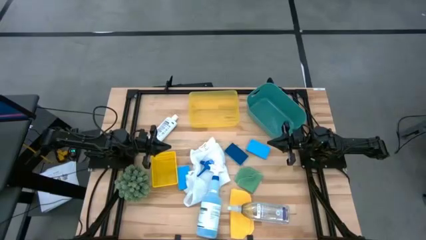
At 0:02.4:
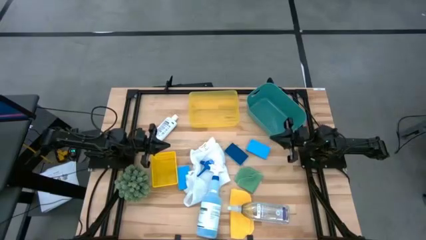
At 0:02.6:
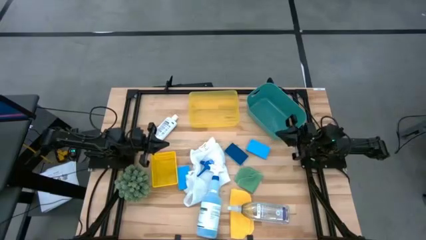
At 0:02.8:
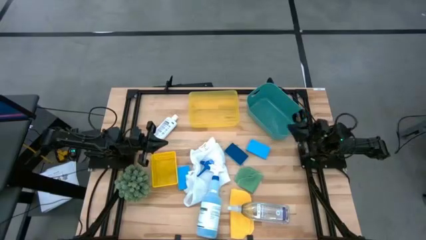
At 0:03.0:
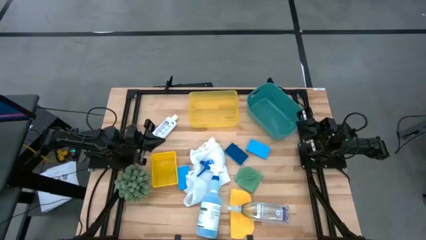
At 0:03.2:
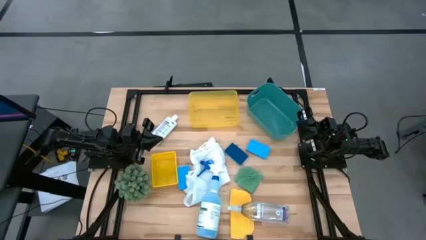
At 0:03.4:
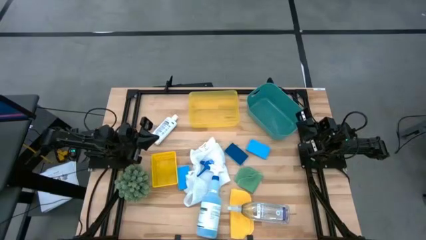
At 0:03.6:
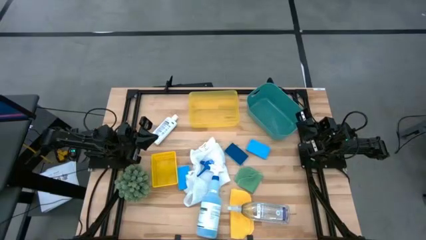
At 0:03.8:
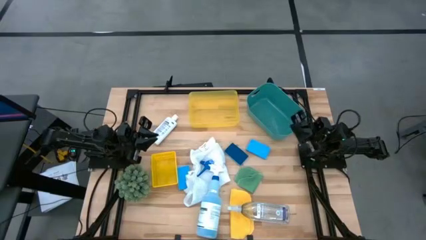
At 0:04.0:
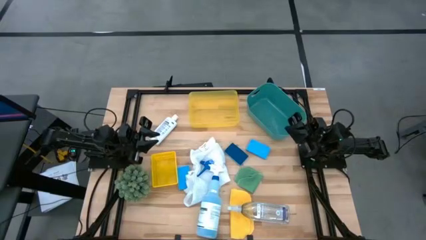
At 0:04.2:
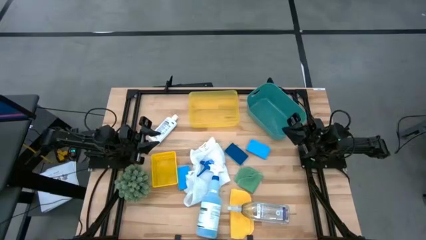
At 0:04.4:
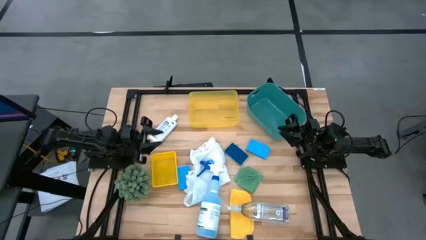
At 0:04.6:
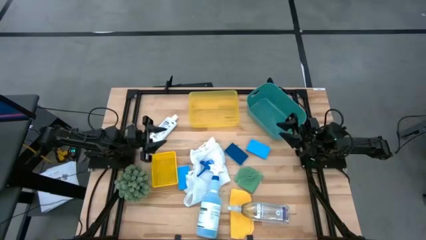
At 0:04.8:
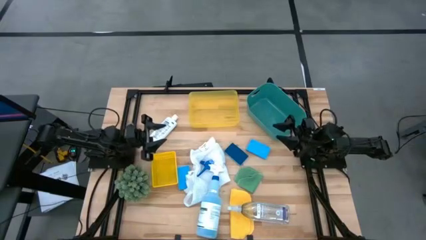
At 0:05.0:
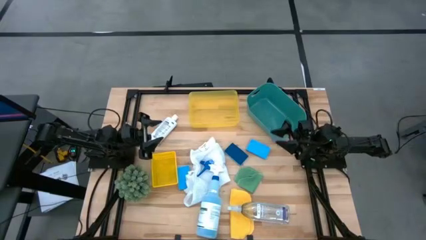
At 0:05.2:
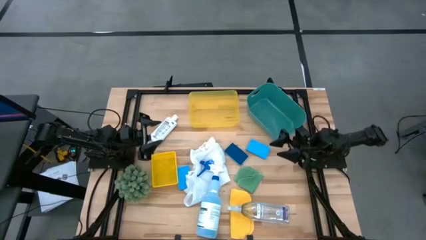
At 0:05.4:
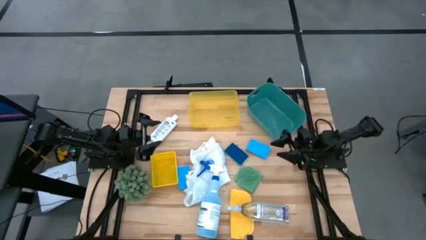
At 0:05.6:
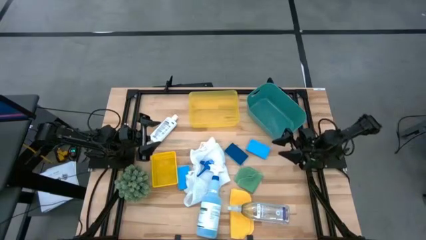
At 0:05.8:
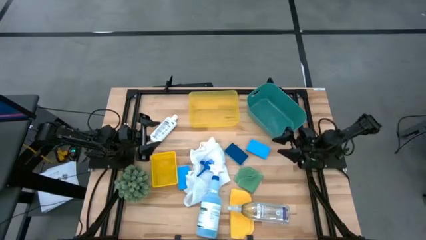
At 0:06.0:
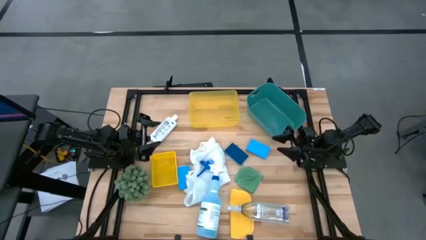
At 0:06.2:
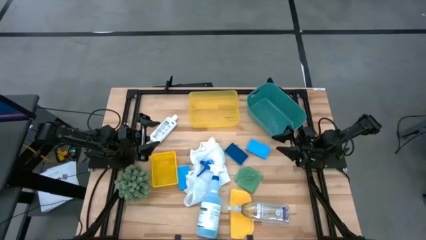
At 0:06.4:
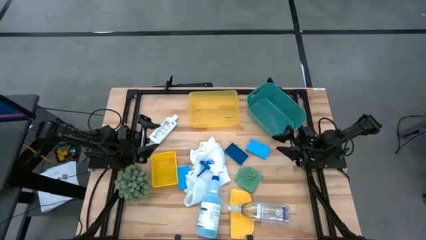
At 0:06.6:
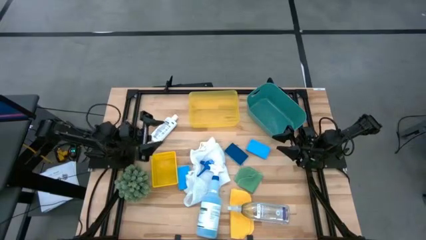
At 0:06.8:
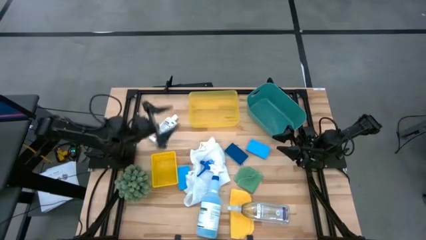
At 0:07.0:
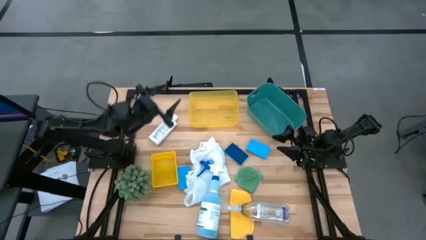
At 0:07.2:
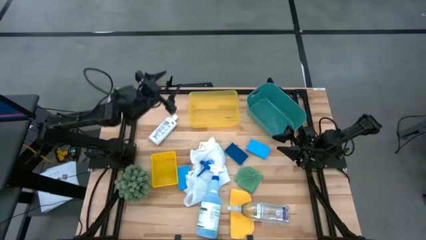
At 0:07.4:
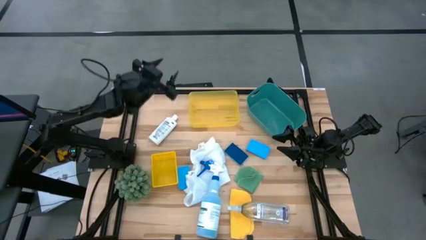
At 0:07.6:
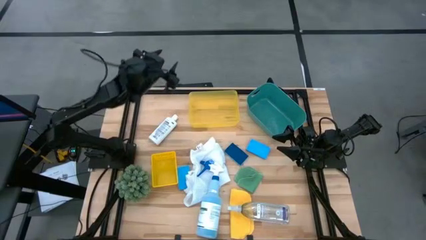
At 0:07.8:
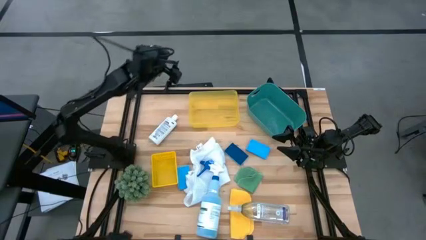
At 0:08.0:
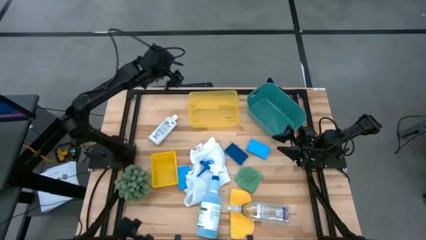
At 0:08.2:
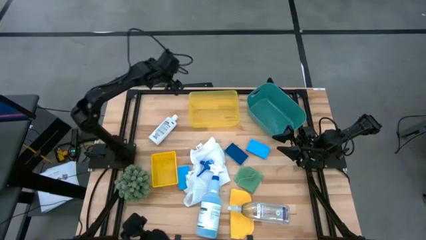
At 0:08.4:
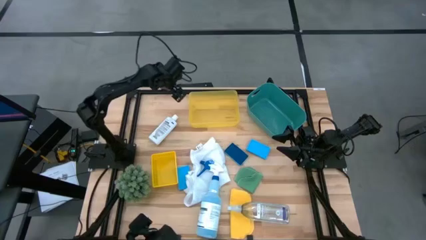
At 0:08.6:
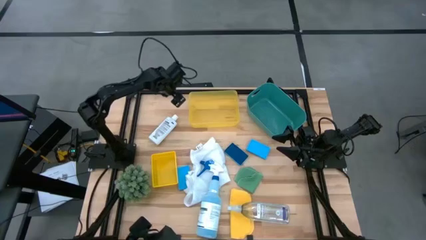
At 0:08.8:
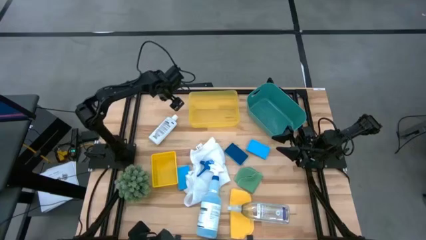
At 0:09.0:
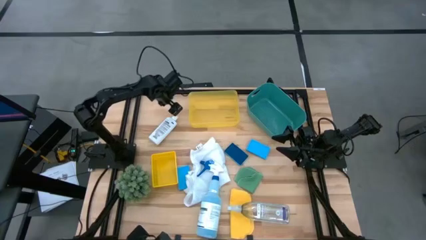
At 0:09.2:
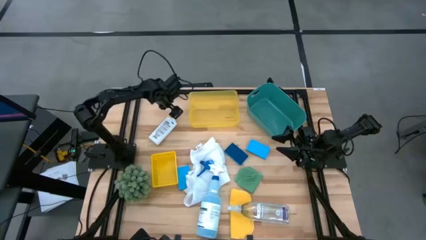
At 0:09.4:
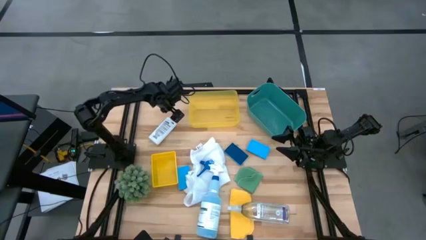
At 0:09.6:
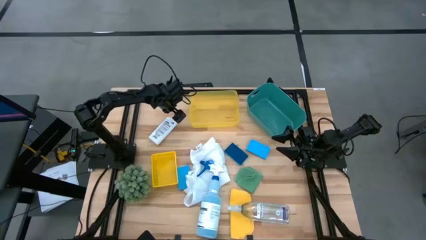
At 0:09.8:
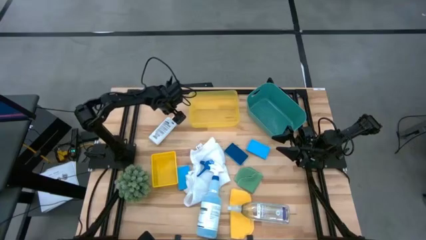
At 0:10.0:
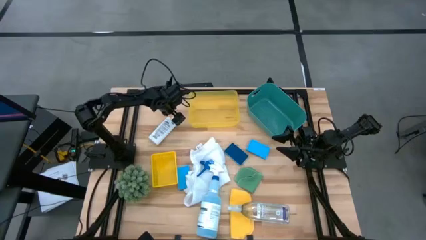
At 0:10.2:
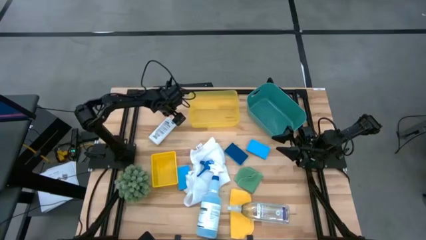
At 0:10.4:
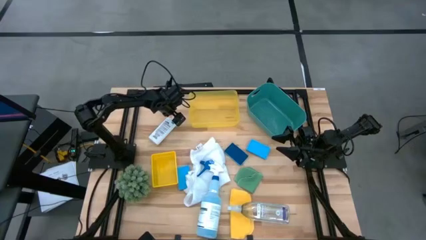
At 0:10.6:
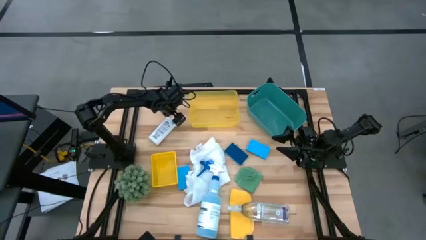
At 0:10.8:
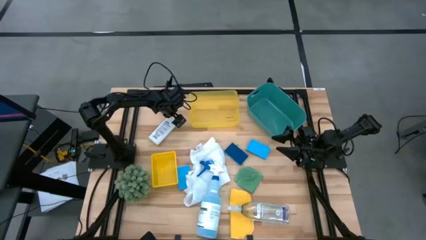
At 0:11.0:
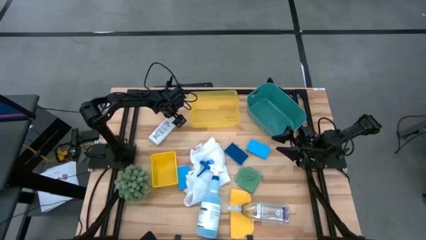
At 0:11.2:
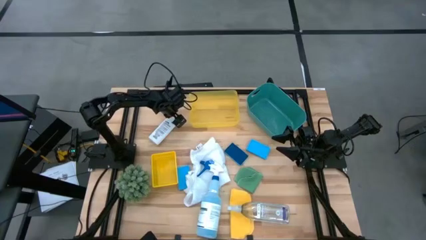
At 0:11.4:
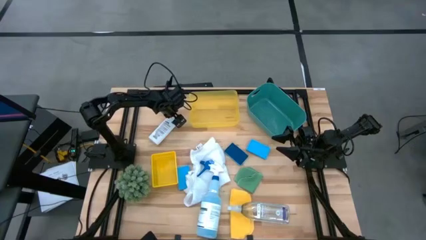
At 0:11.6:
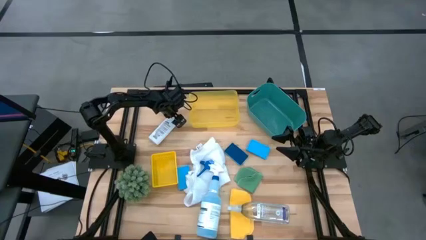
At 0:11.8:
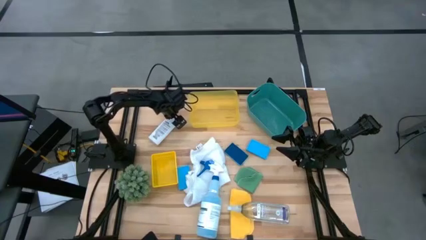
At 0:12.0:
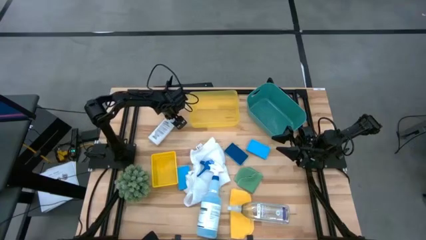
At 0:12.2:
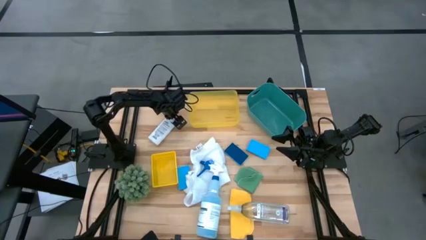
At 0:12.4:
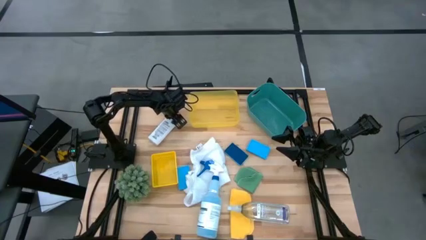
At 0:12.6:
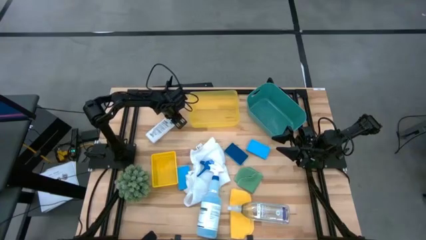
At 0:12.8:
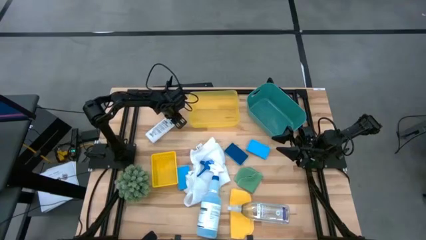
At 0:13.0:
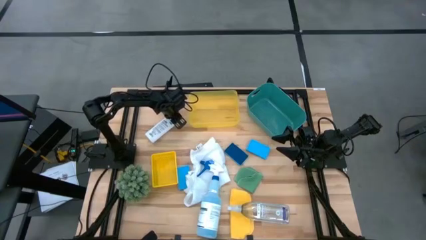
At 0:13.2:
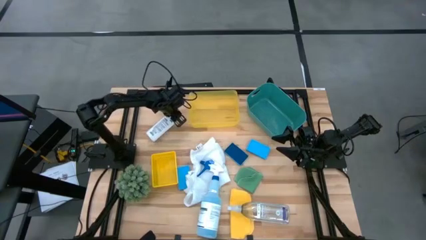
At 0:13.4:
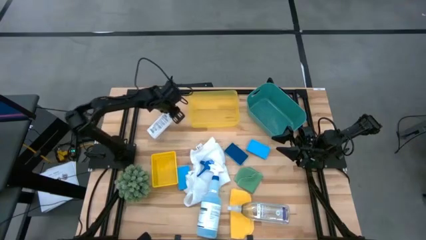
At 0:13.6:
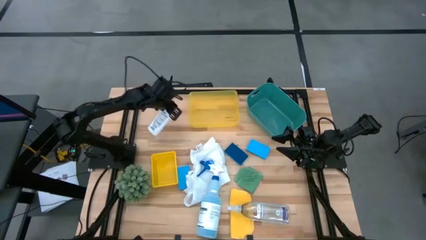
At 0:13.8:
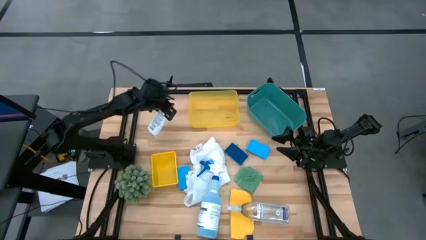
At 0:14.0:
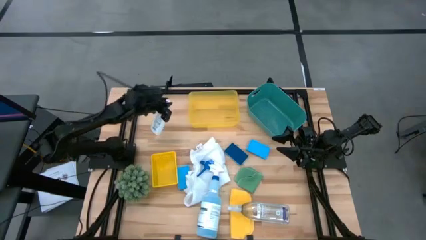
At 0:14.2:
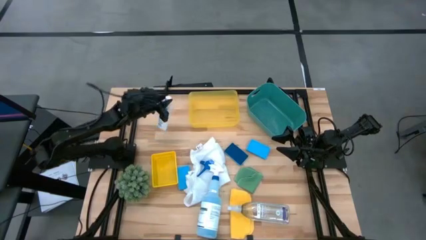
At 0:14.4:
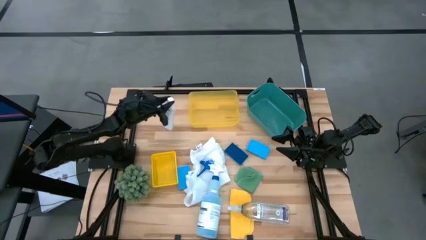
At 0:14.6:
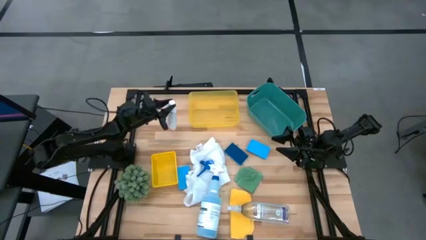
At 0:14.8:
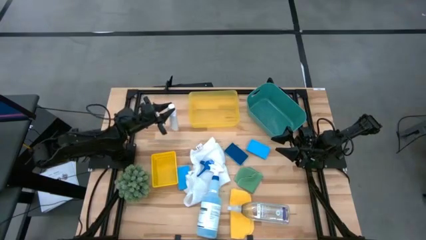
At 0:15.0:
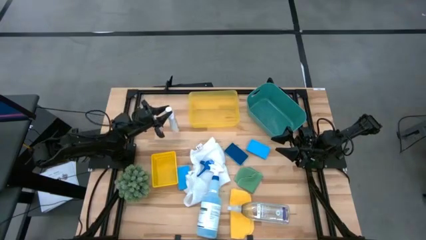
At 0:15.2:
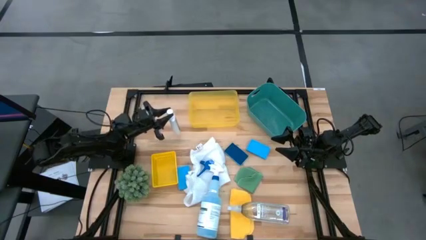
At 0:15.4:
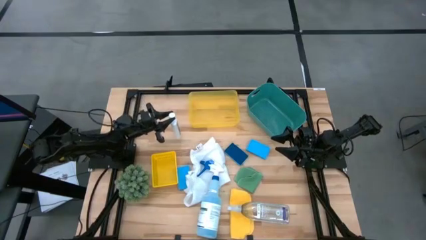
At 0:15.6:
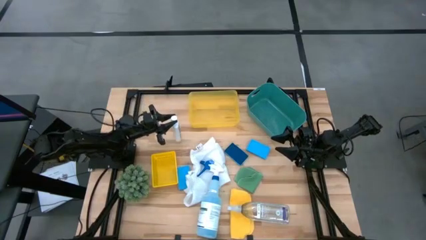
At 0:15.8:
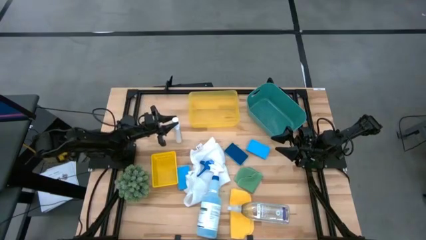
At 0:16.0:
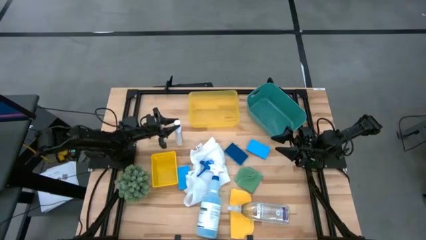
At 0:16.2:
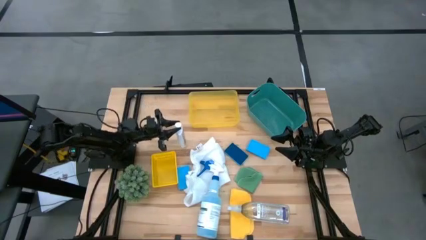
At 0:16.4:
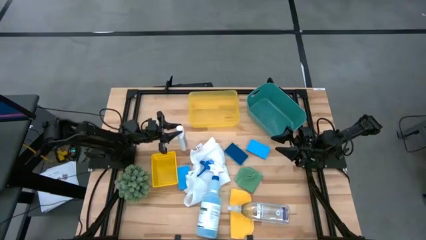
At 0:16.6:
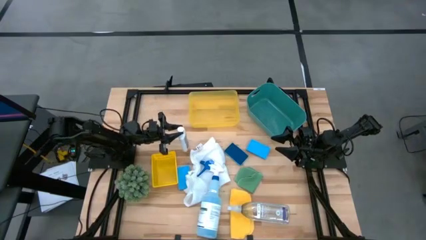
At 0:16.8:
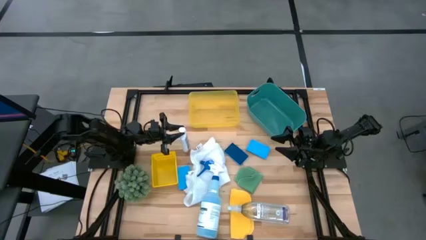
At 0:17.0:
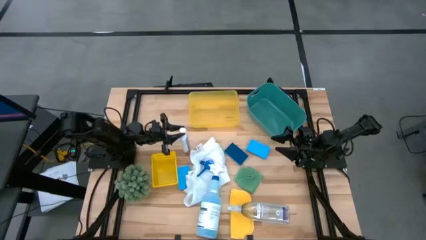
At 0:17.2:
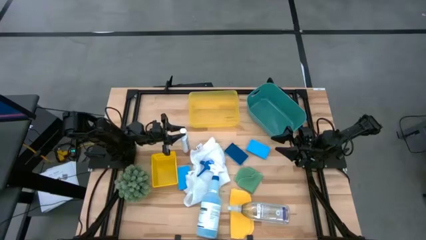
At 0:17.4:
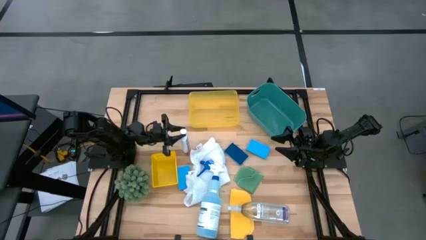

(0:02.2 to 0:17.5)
Task: Pick & Place Kitchen Items
Put the white cleaning bottle into the top yellow bin
